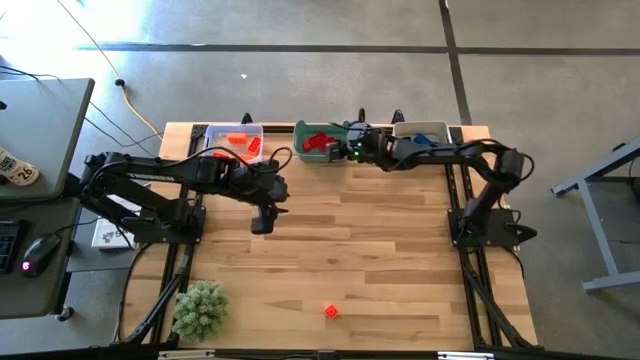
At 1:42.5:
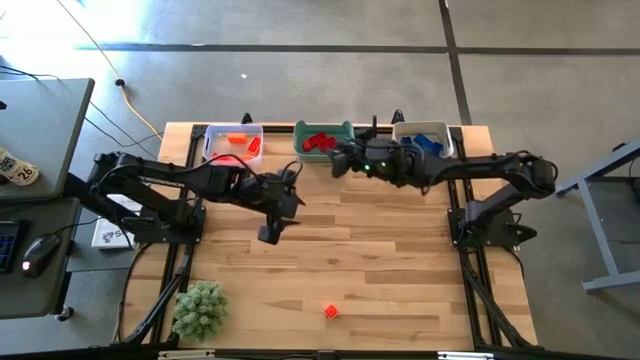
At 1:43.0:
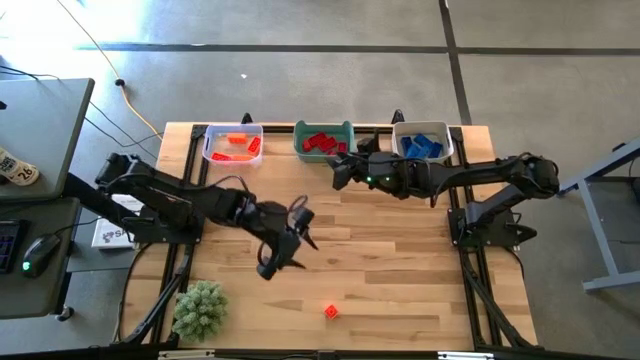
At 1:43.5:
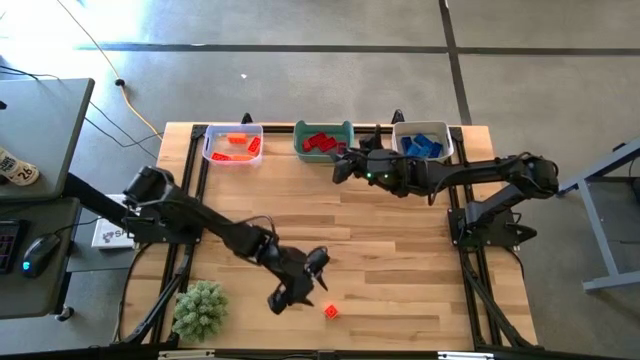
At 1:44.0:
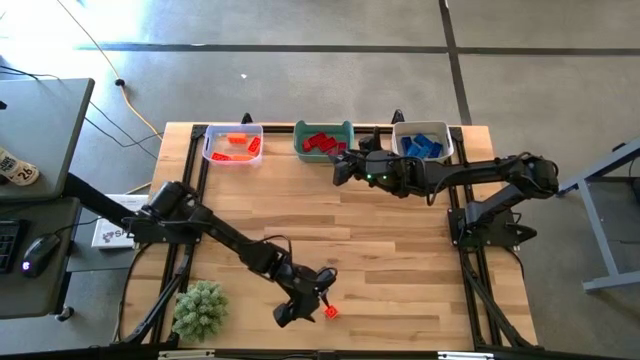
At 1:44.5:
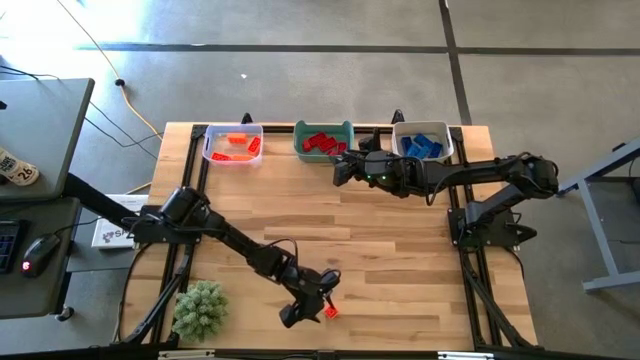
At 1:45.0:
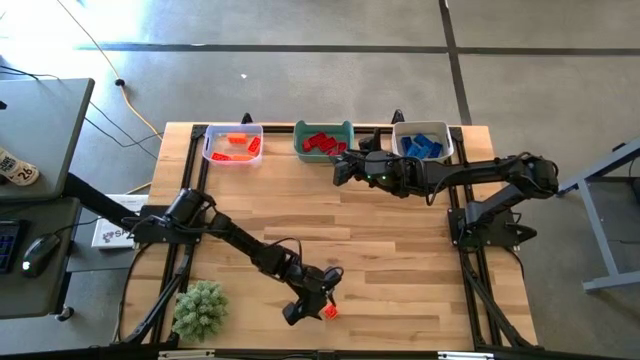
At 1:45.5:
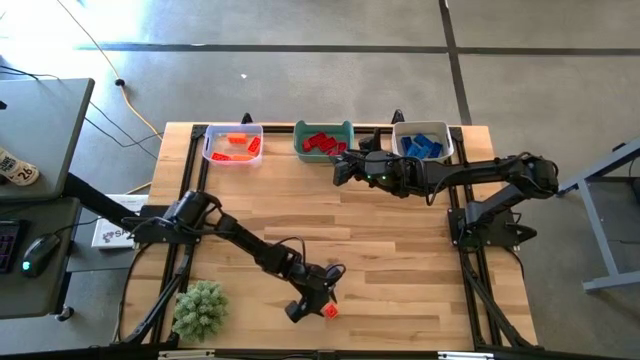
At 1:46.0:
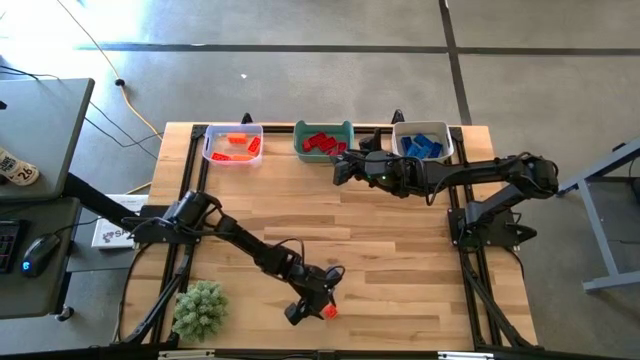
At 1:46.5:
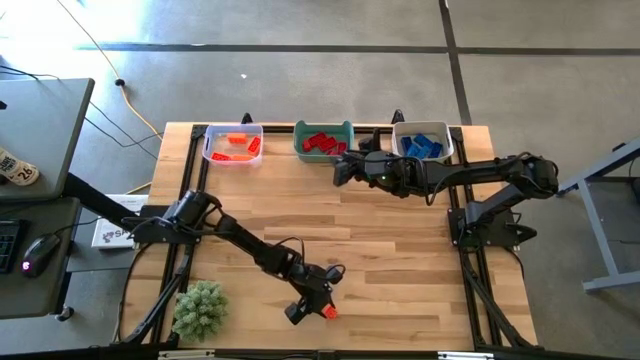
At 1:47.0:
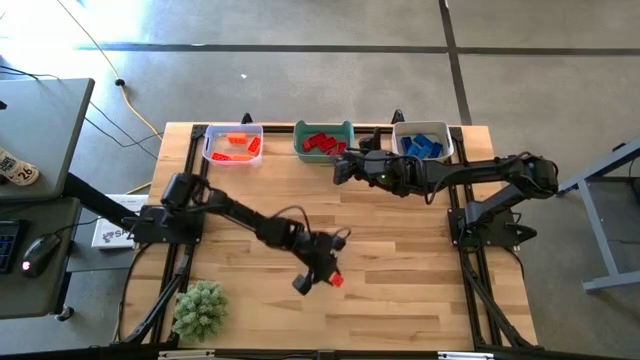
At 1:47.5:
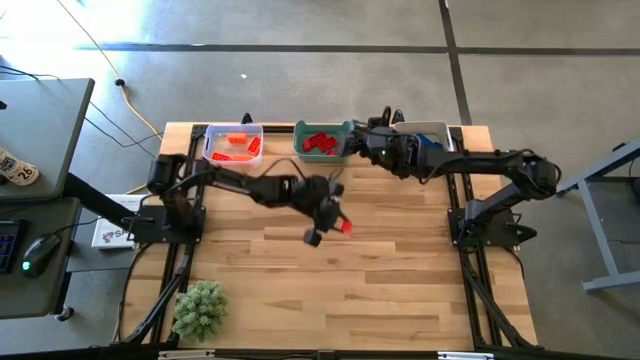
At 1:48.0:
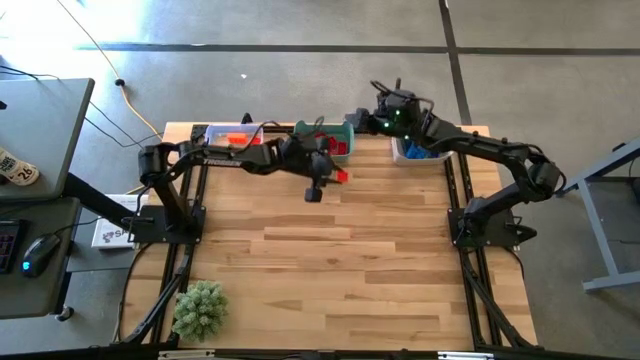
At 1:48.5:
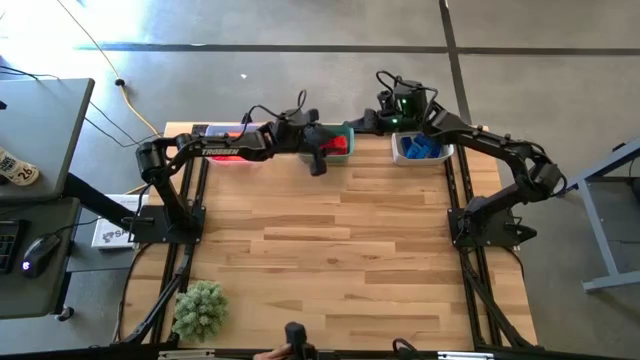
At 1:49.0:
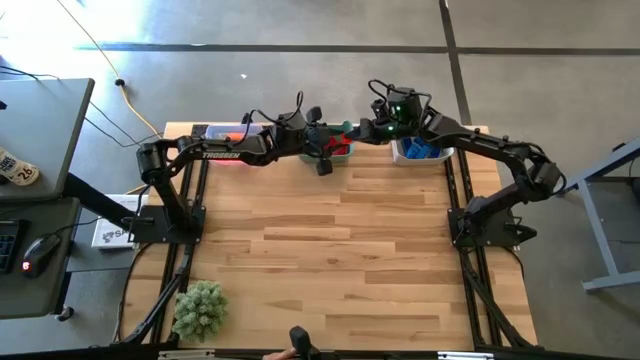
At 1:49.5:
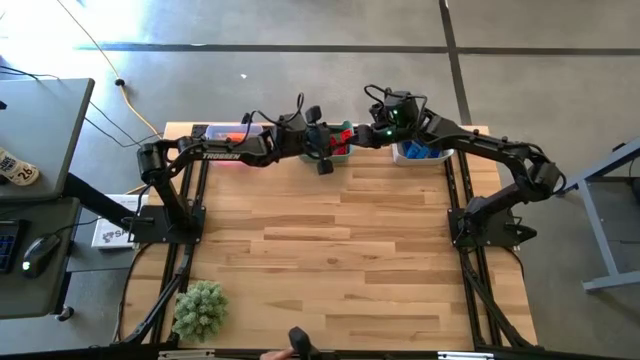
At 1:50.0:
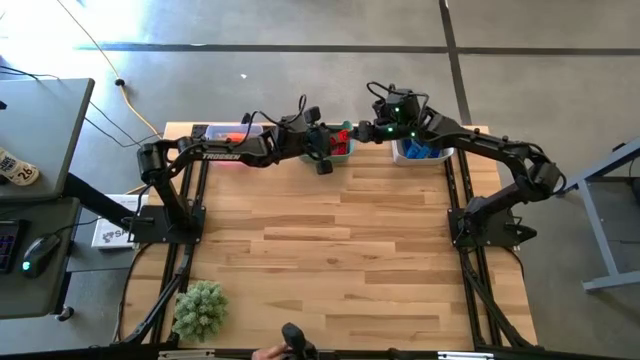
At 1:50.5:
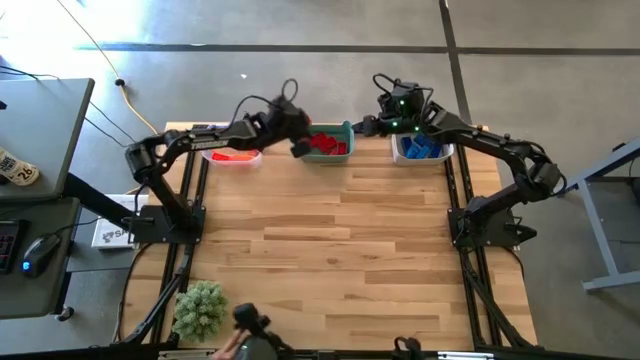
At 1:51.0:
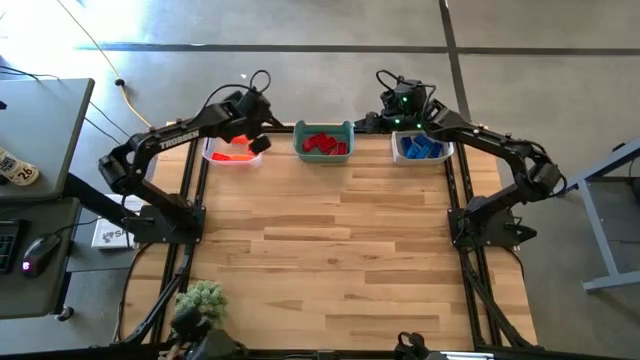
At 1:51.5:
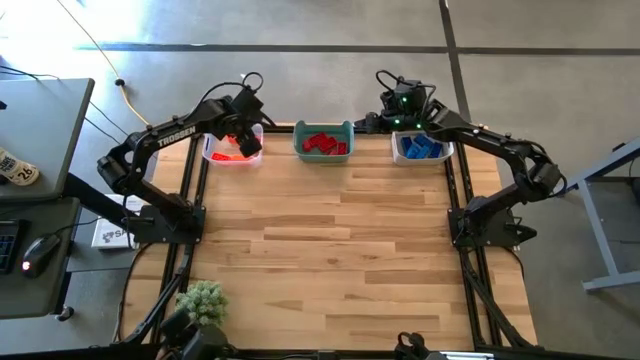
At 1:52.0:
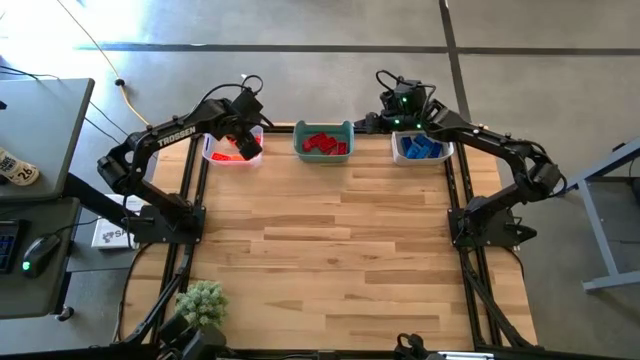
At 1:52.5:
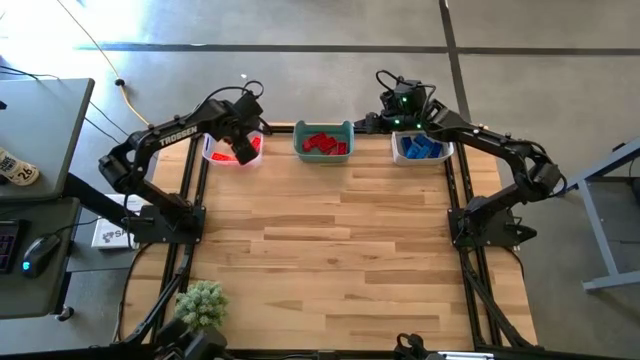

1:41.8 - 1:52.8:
Task: Sort & place blocks by color
Put the orange game piece into the transparent bin

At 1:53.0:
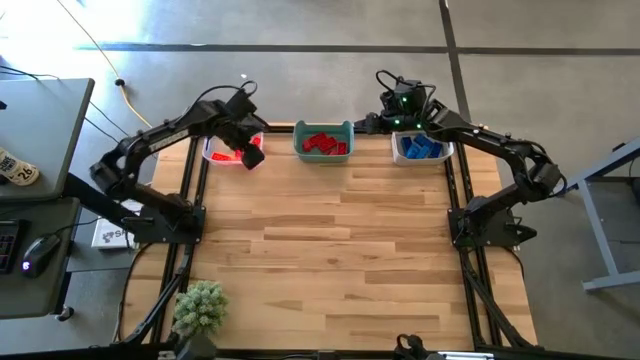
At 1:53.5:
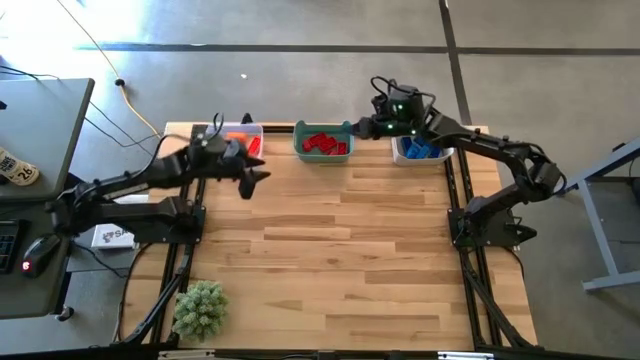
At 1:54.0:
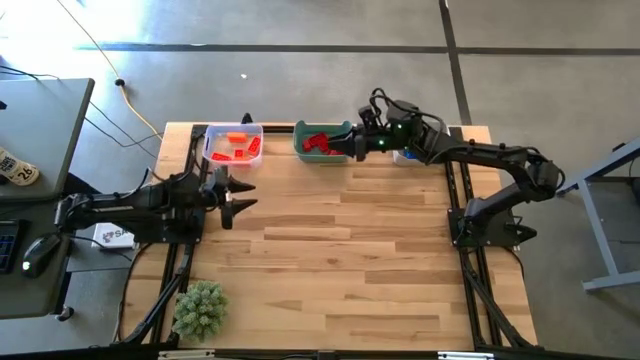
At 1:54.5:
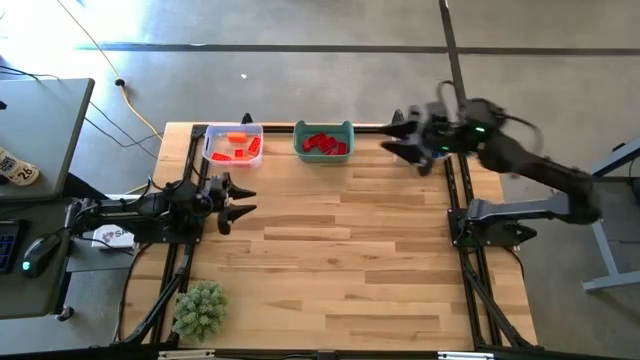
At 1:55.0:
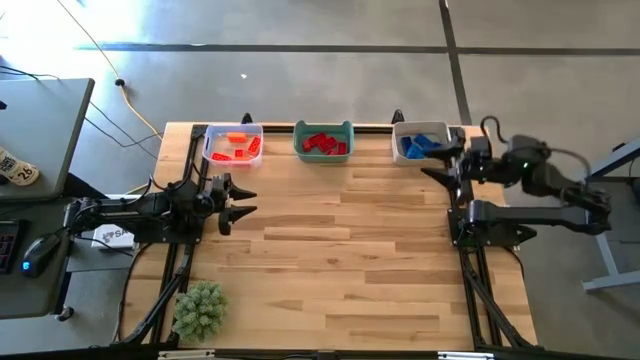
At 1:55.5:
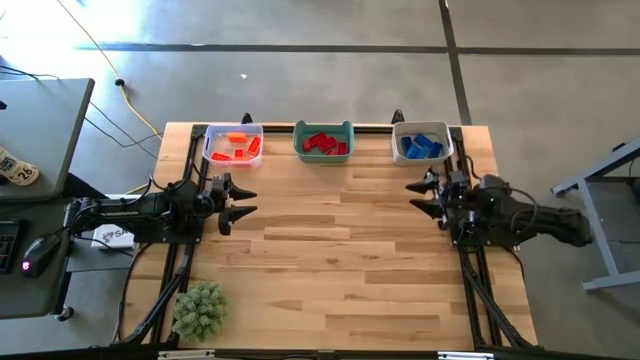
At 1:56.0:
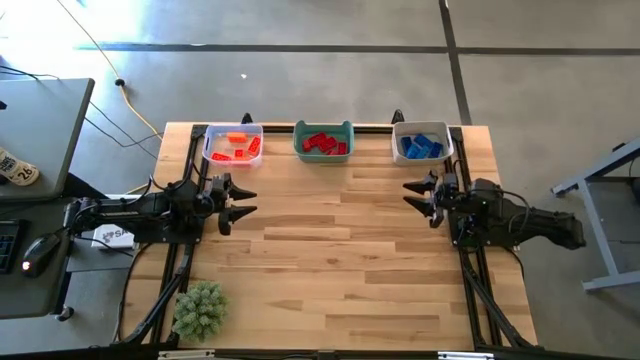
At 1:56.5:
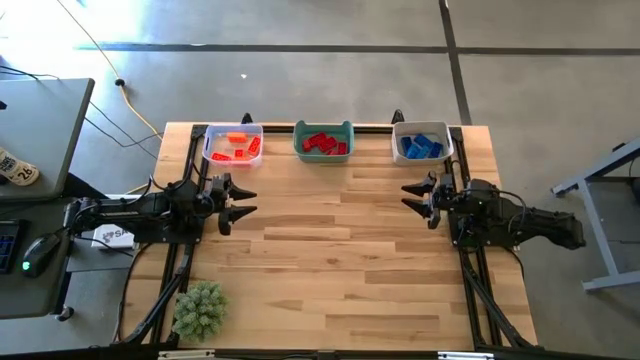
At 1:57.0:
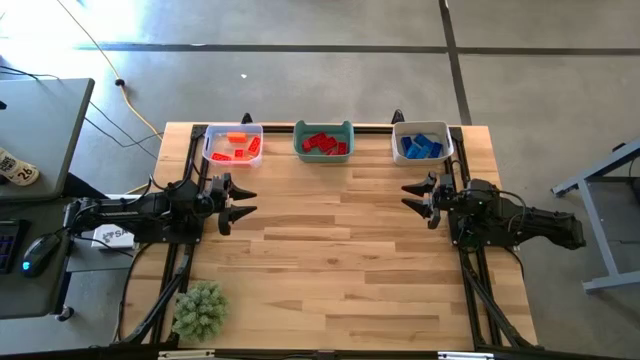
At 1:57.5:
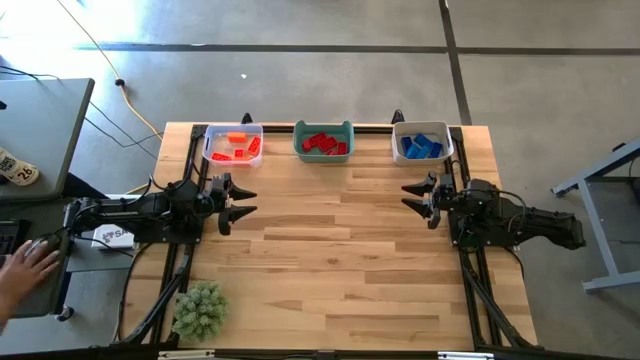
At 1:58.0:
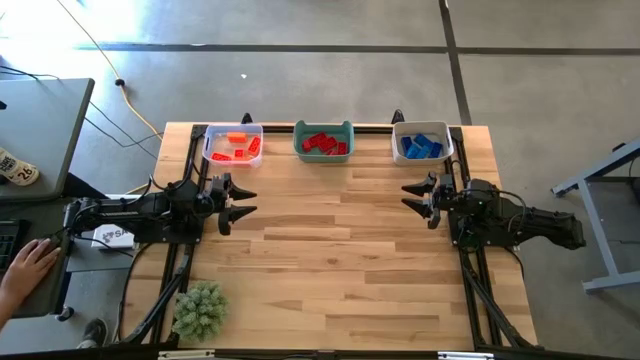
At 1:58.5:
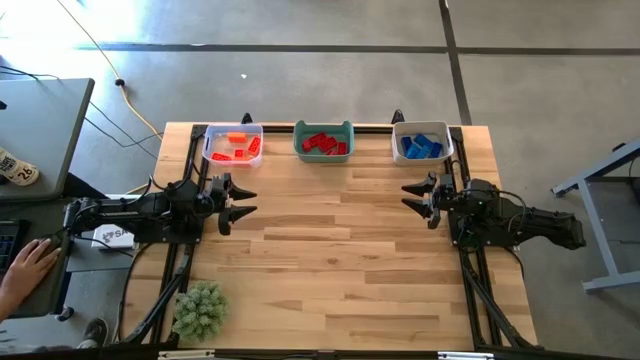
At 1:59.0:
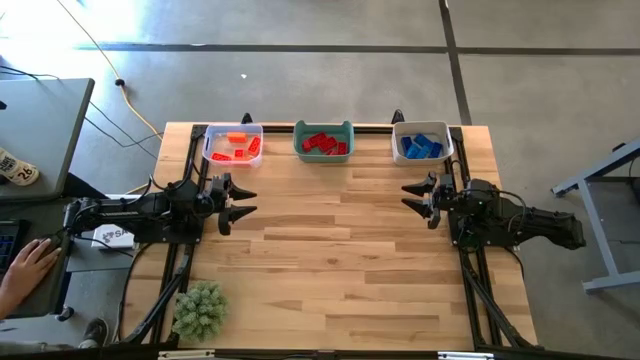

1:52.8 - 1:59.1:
Return to Home Position

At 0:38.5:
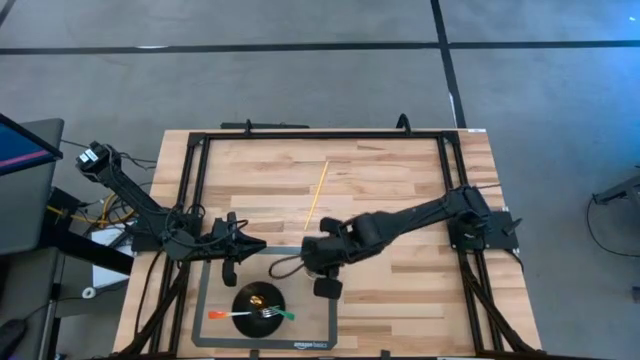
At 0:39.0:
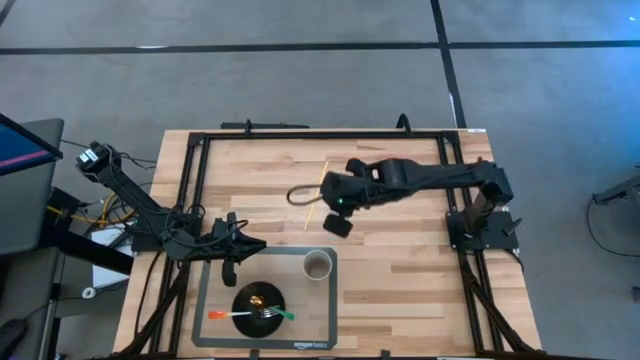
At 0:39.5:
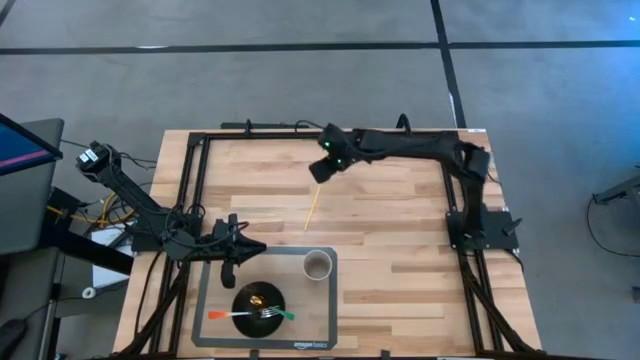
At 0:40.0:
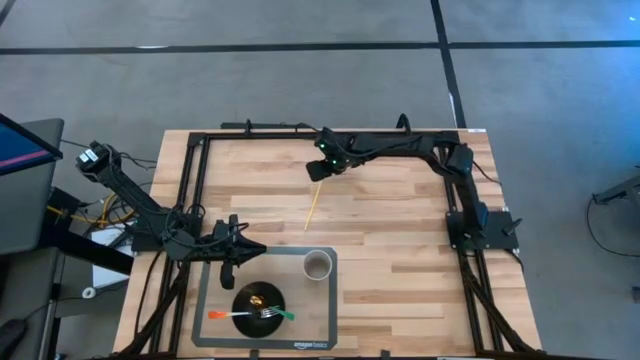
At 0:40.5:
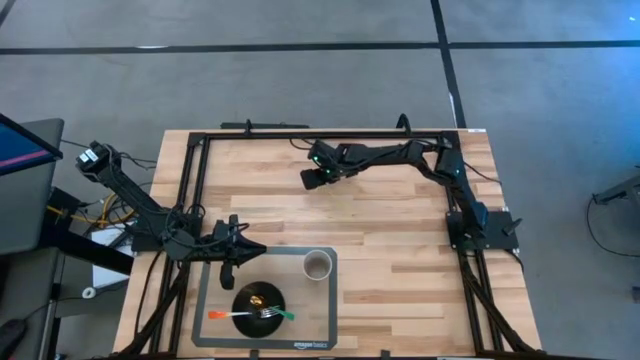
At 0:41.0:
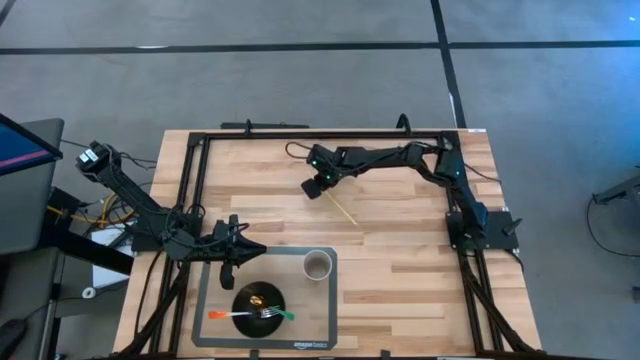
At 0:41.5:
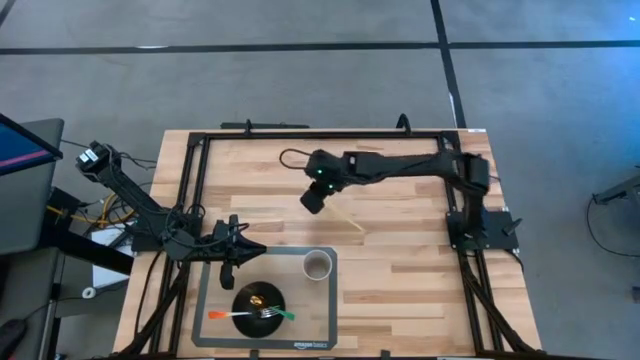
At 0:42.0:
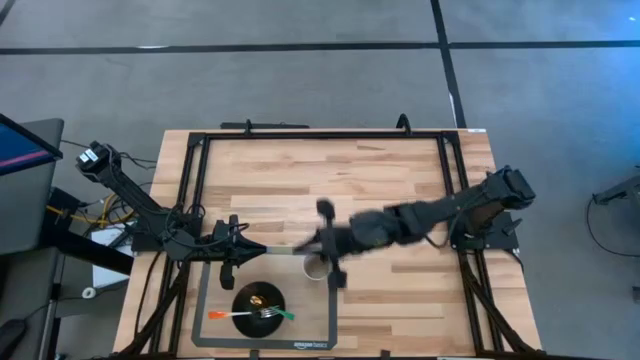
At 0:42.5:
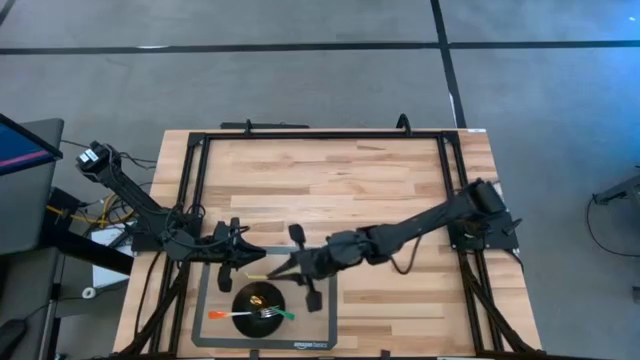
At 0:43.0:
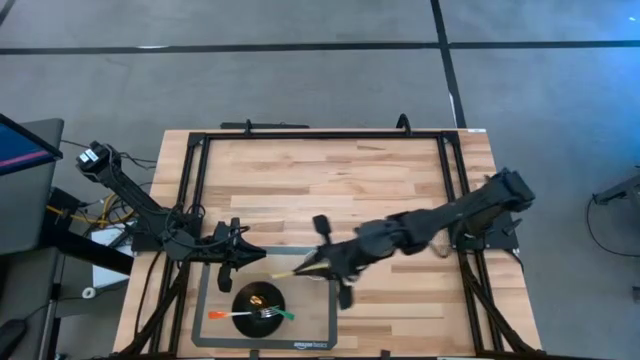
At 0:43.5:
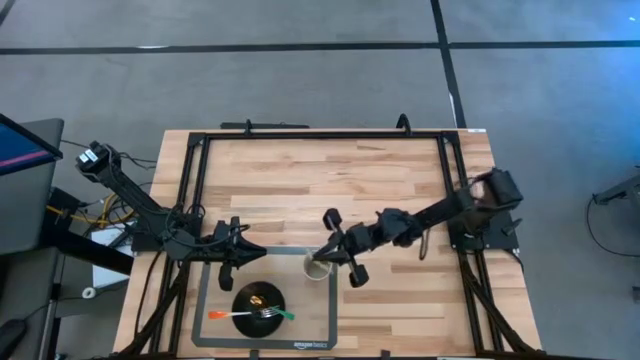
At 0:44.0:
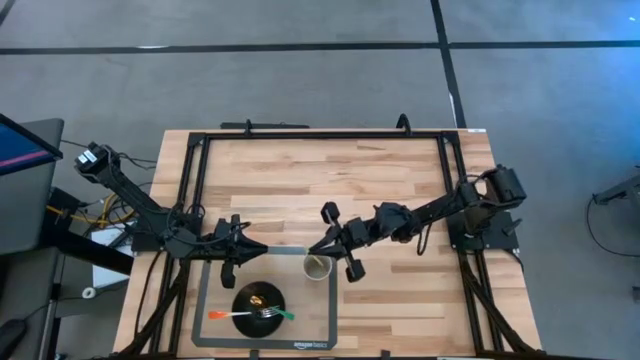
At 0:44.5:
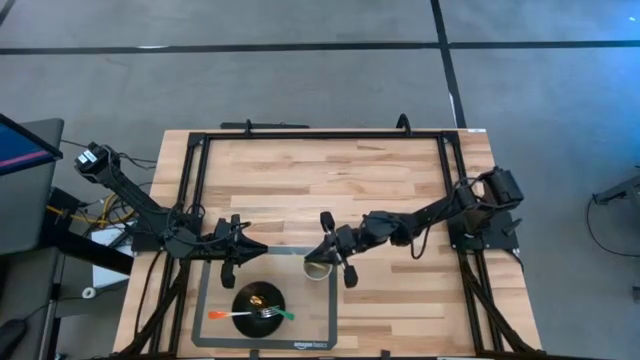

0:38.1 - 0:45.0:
Task: Pick & Place Utensil
Put the yellow straw into the white cup on the transparent mat
